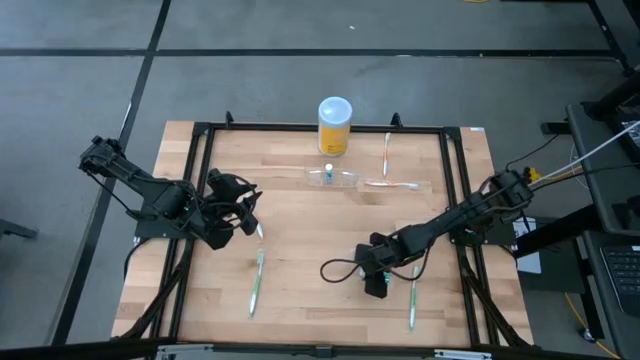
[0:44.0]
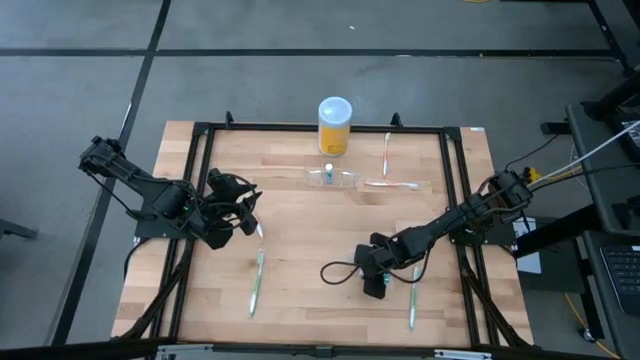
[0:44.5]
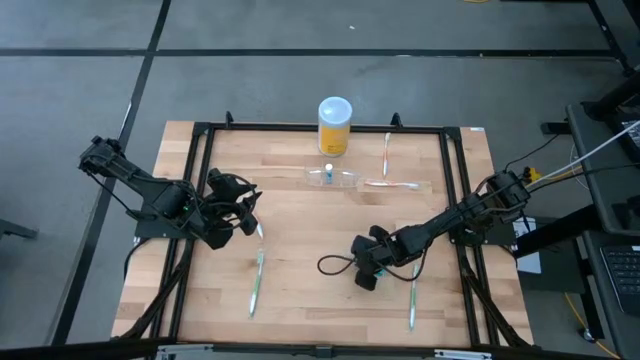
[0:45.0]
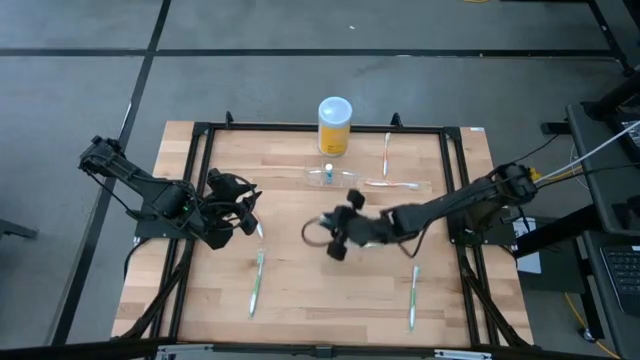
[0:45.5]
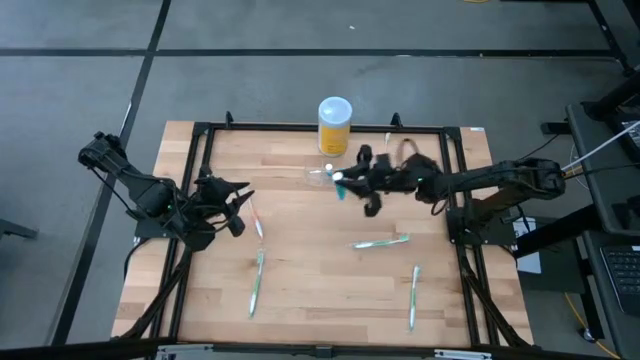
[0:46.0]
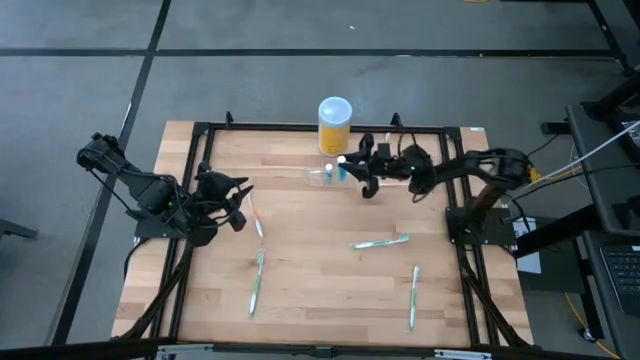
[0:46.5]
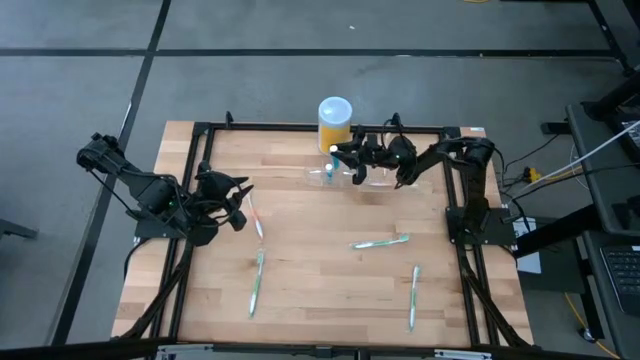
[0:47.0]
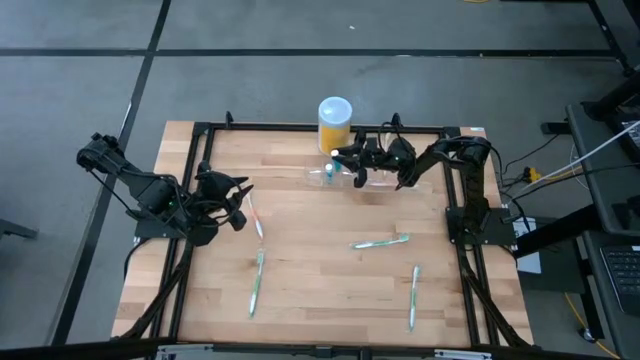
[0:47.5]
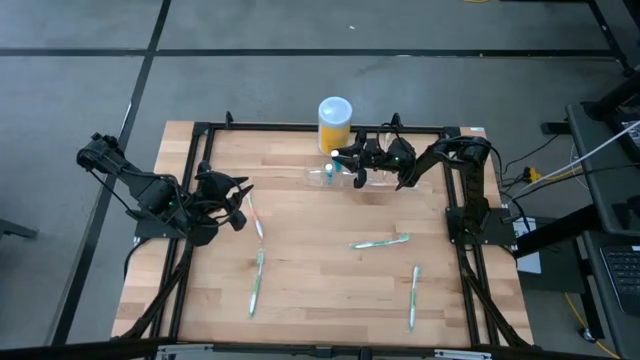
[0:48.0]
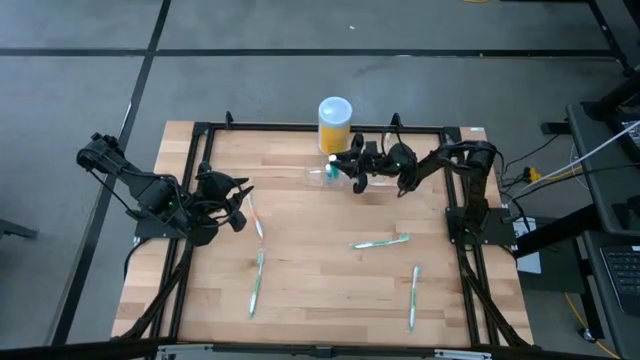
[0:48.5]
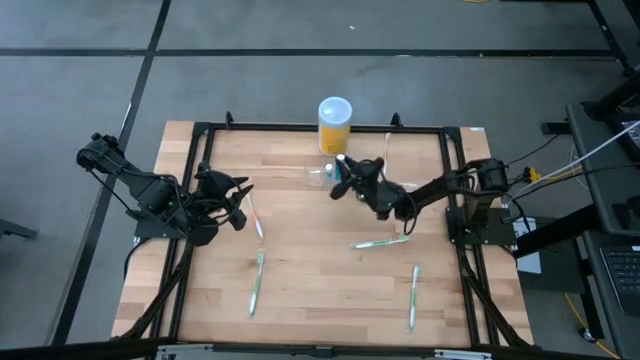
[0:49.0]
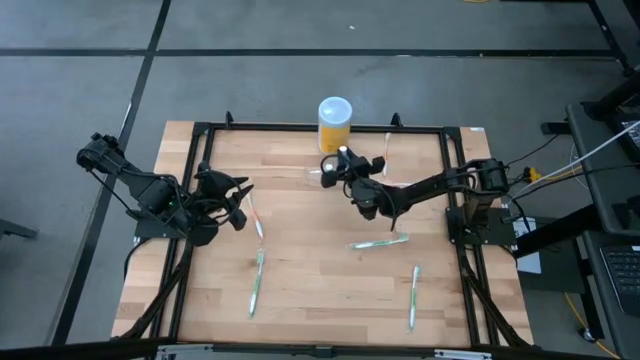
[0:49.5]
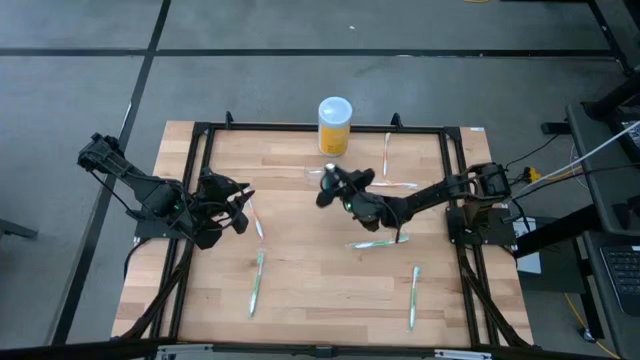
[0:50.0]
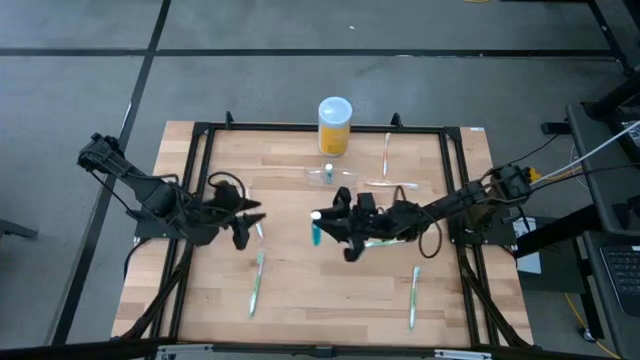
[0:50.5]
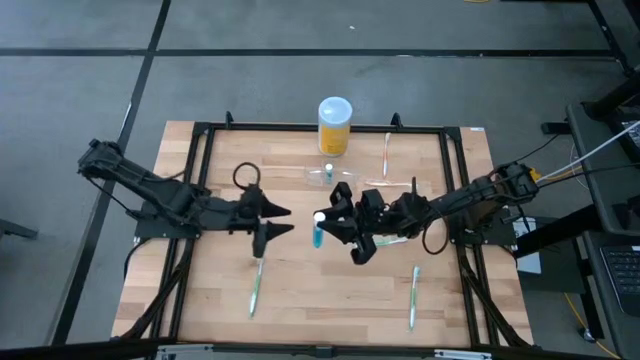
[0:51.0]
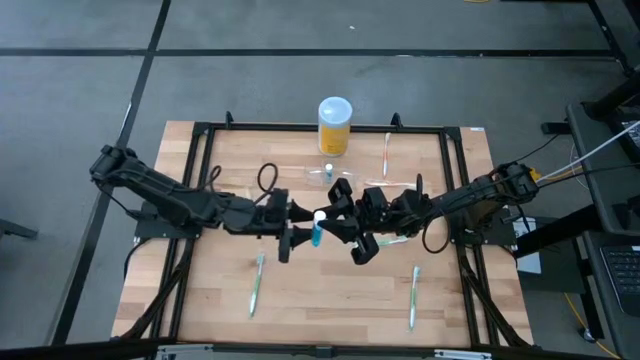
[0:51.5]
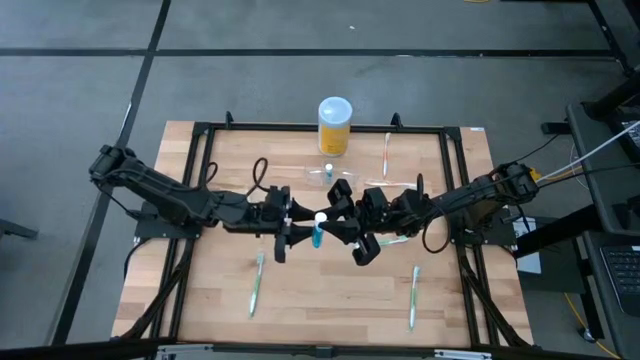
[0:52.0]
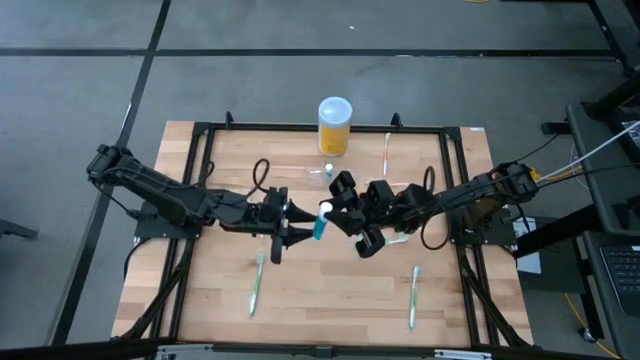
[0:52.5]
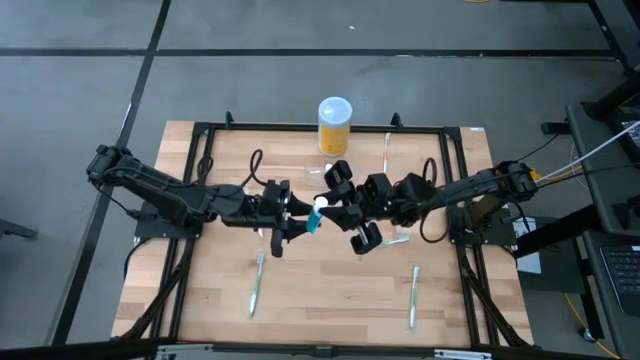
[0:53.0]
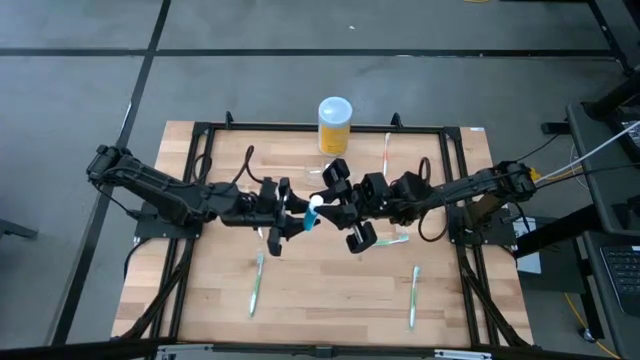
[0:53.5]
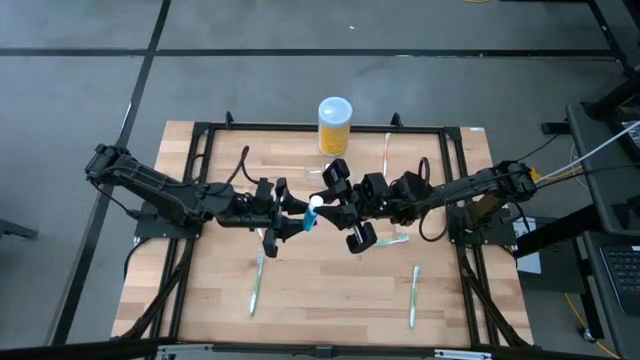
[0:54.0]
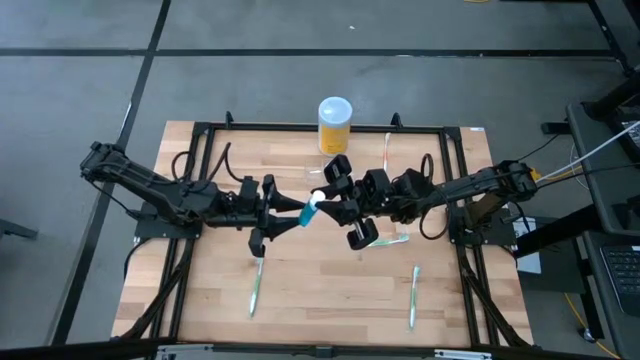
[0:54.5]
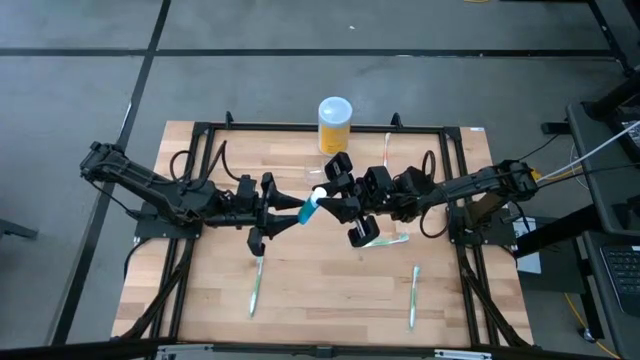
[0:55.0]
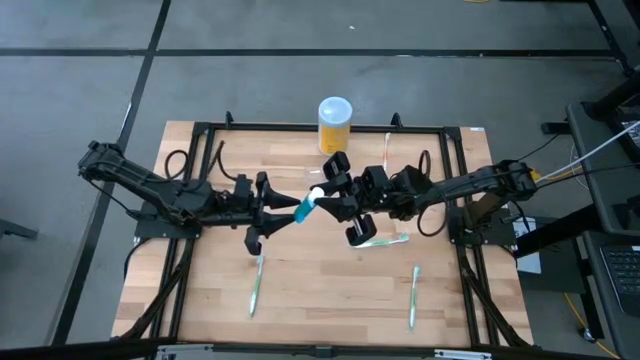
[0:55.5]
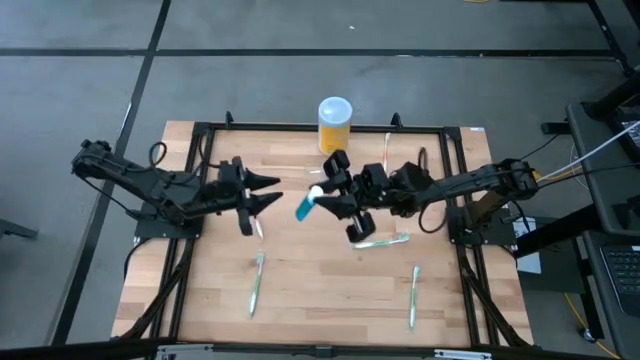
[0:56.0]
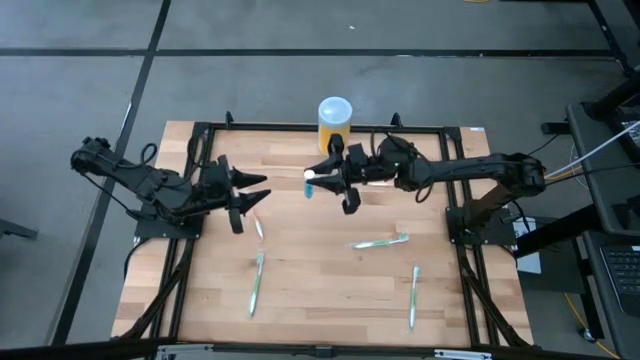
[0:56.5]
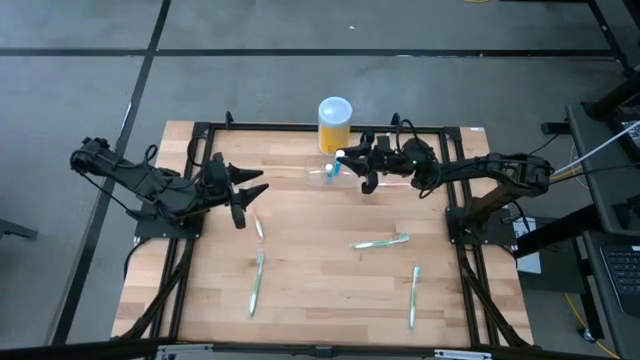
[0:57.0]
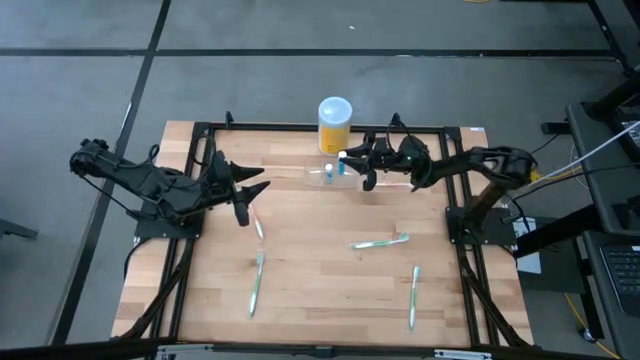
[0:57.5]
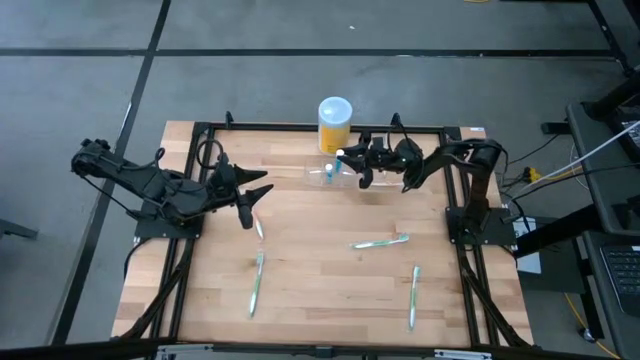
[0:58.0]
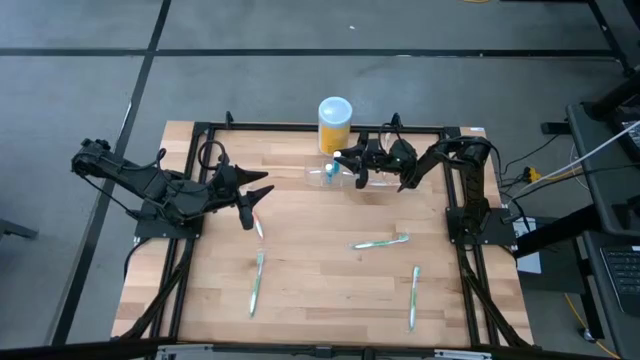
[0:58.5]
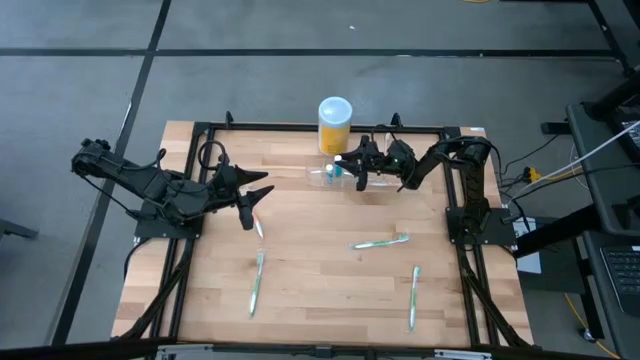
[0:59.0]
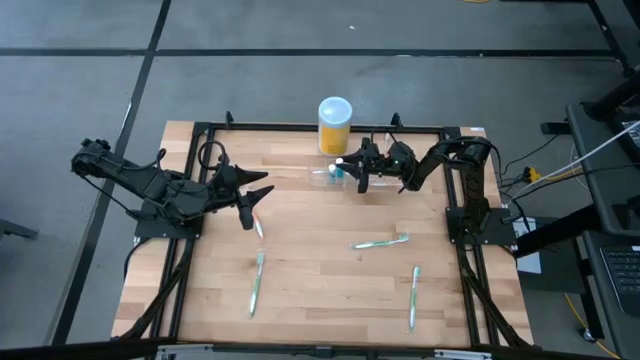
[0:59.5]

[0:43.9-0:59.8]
Task: Pick & Place toothbrushing station
Put the blue mouthwash into the transparent organizer

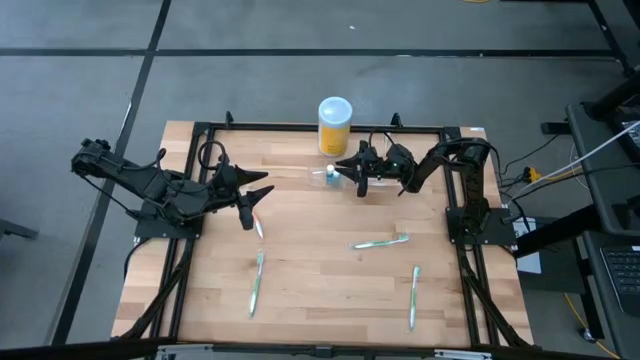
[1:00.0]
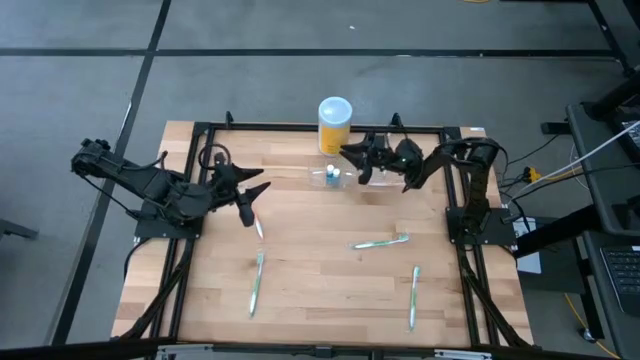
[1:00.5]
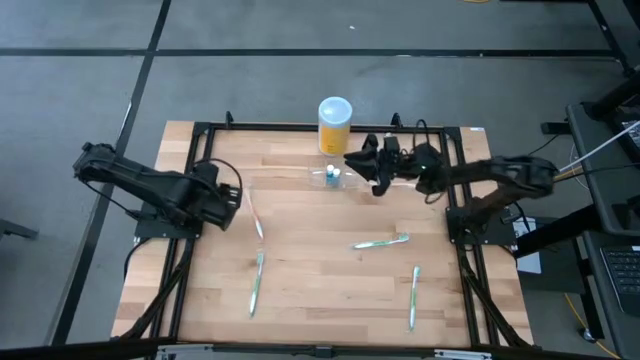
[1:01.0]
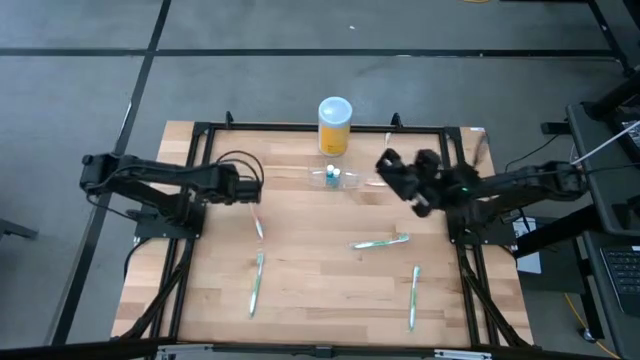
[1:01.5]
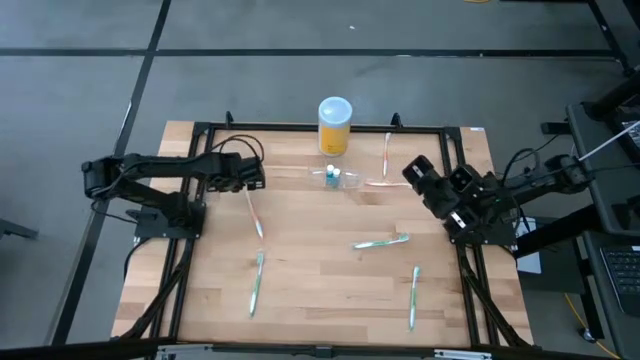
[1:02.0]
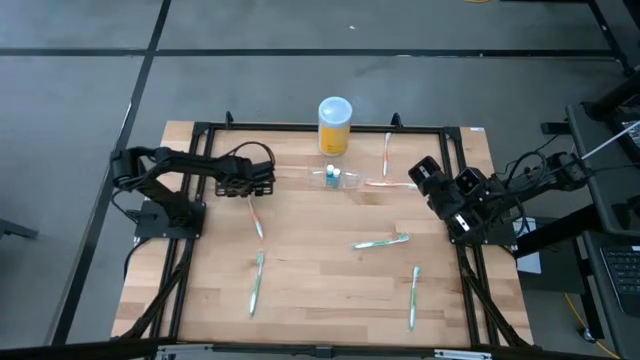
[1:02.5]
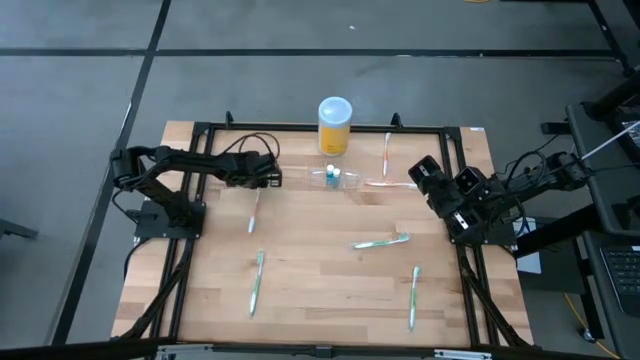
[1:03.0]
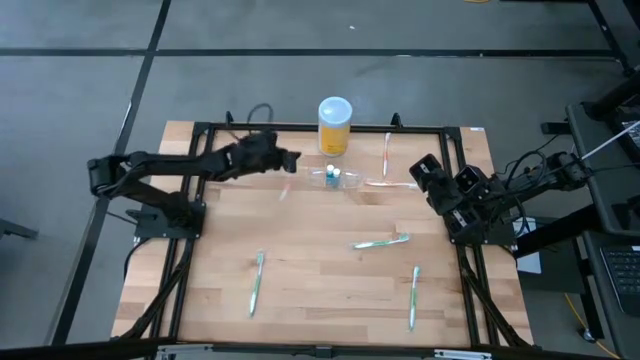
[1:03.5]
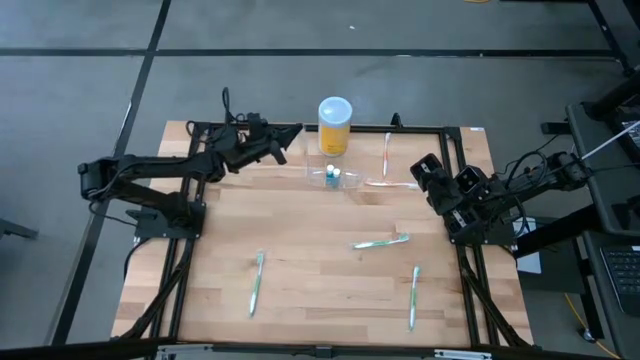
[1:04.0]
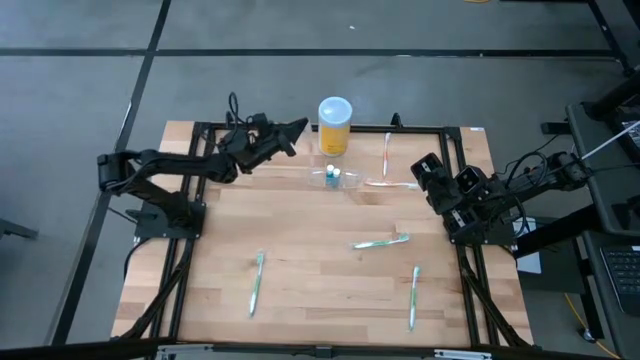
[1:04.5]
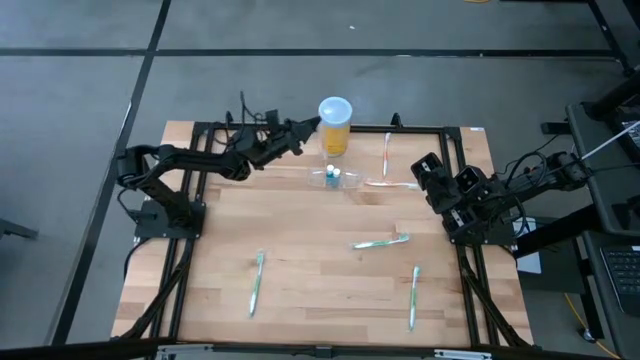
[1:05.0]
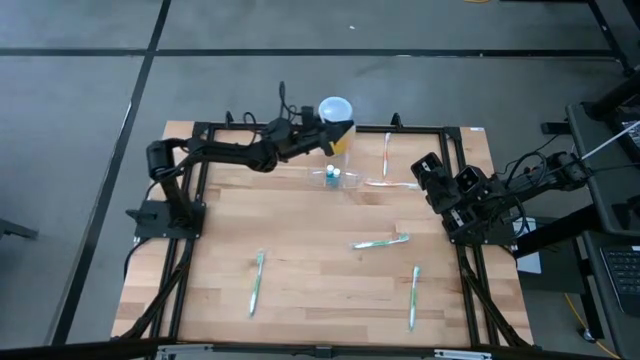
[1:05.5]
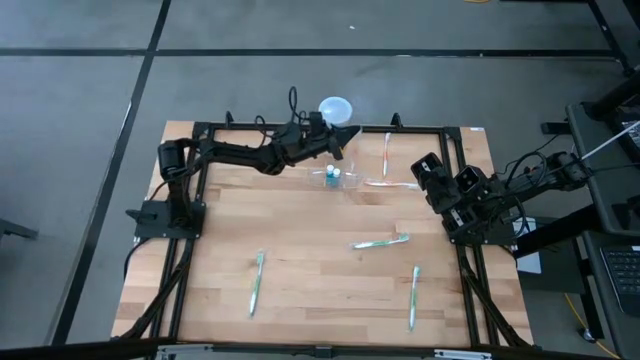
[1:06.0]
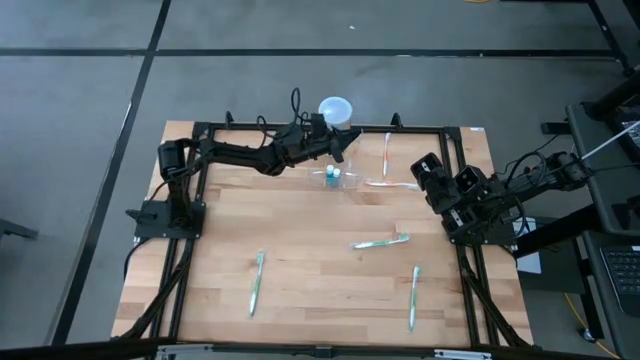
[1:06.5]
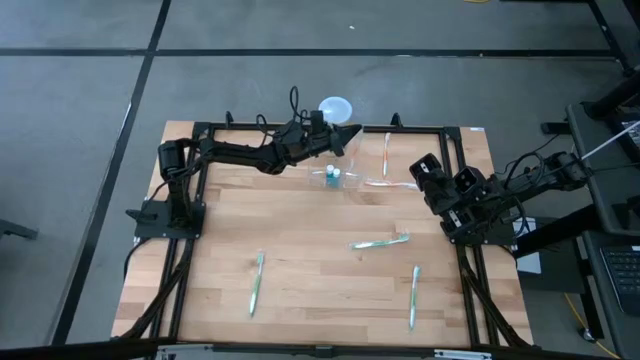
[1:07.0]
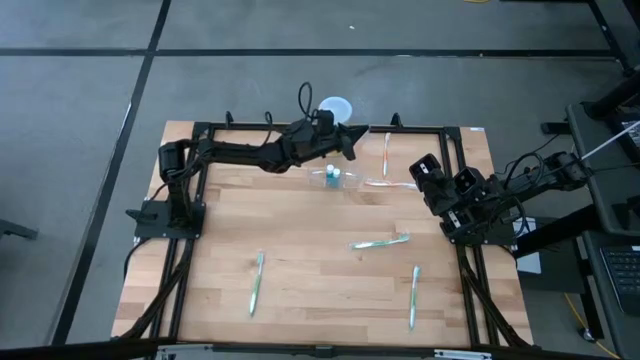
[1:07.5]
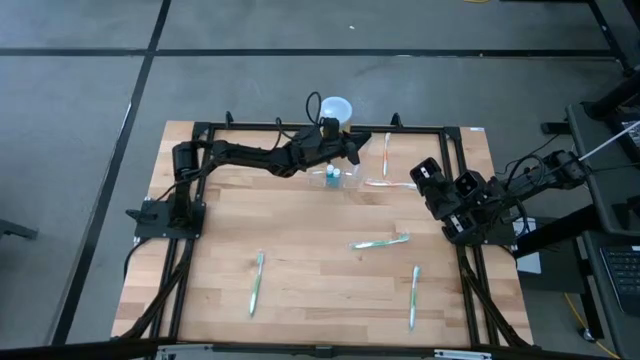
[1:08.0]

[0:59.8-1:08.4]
Put the bottom left orange toothbrush into the transparent organizer
